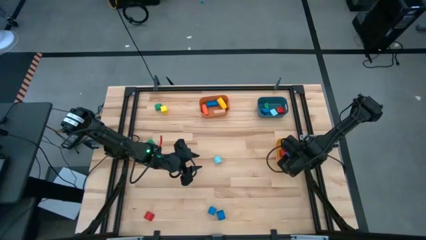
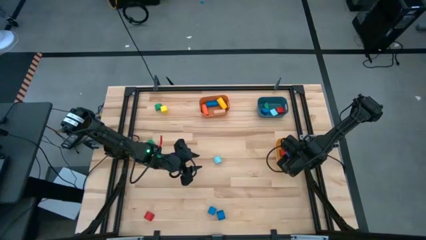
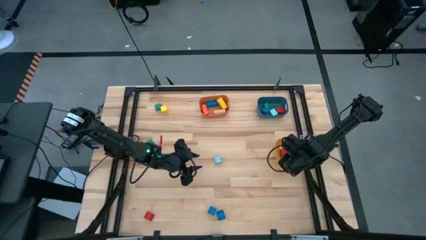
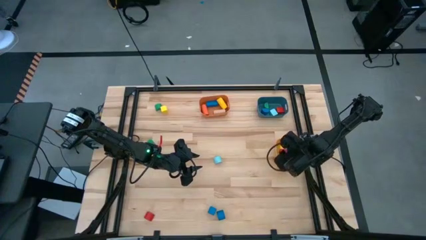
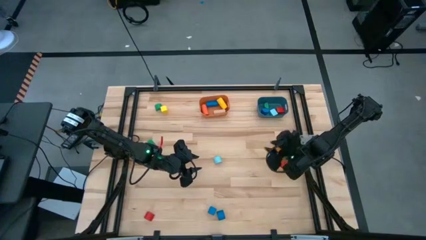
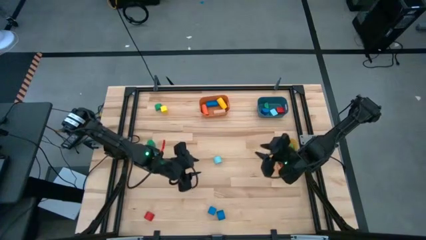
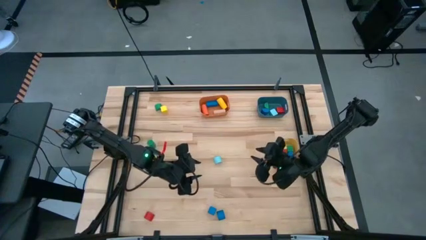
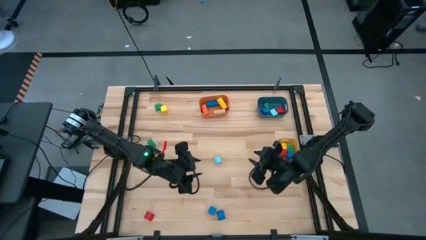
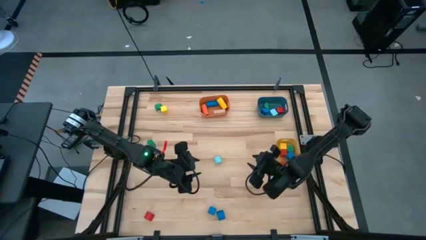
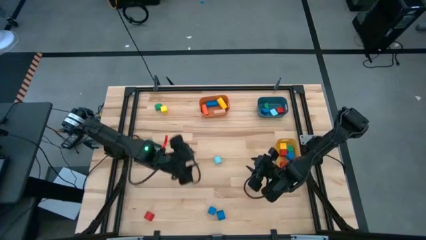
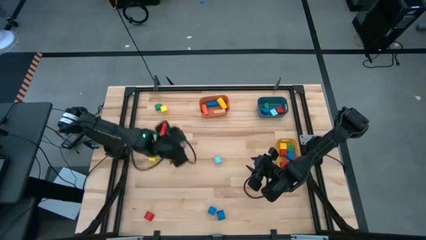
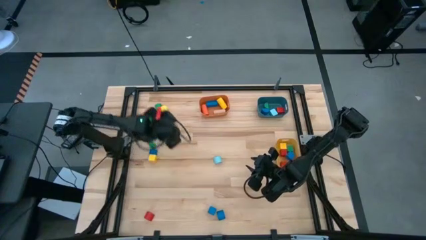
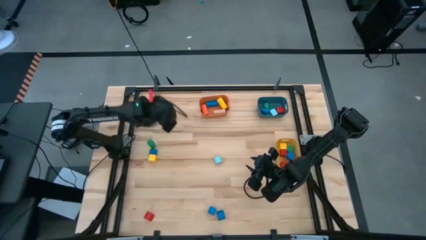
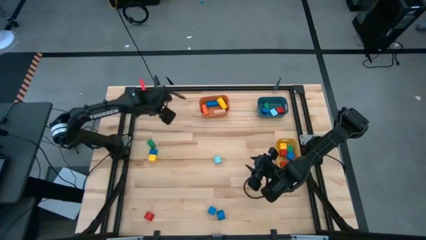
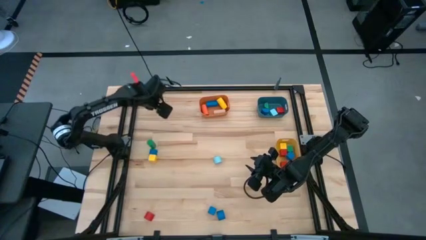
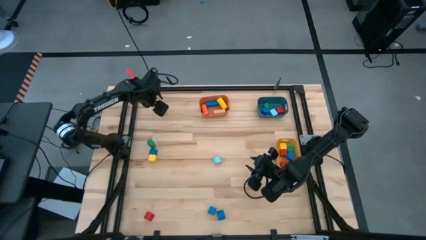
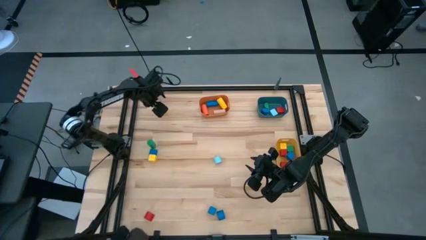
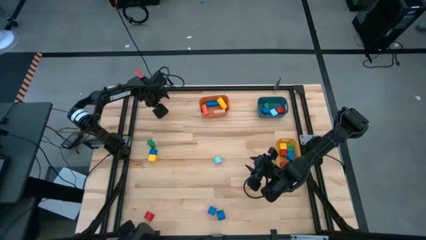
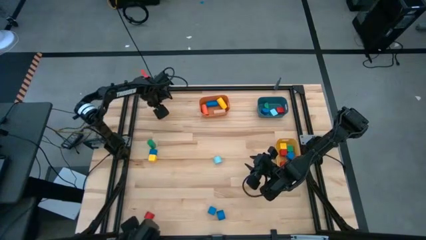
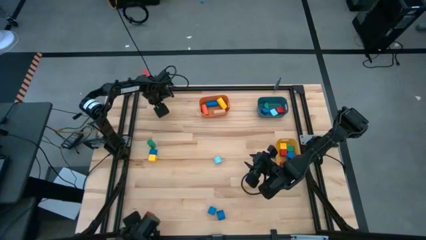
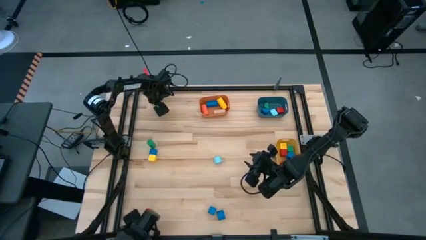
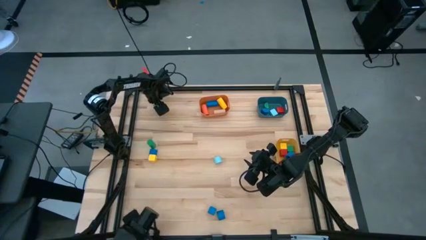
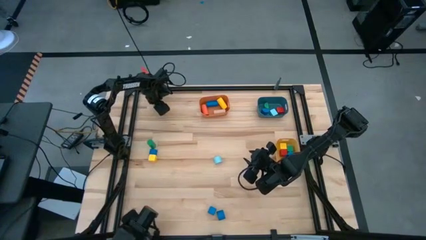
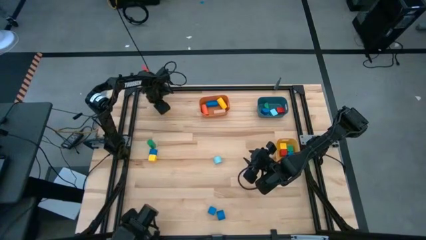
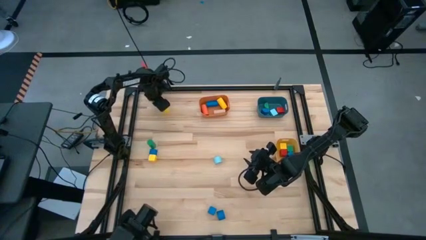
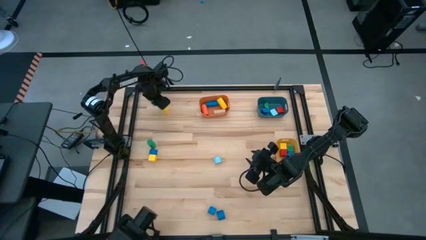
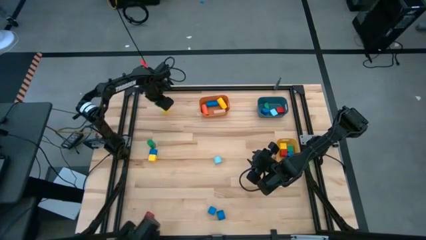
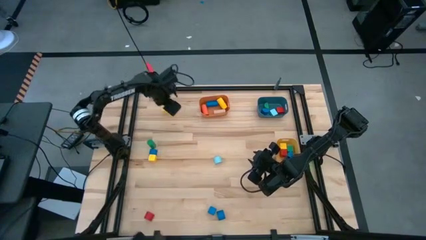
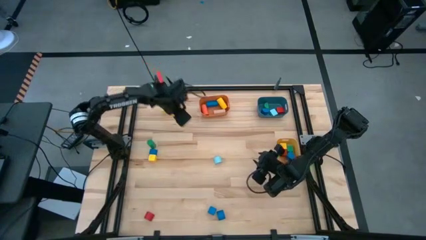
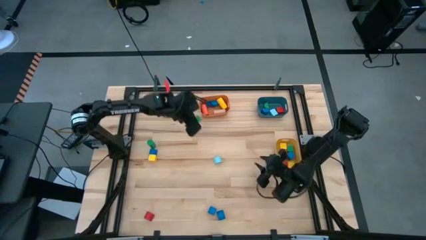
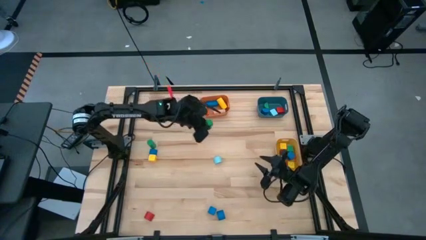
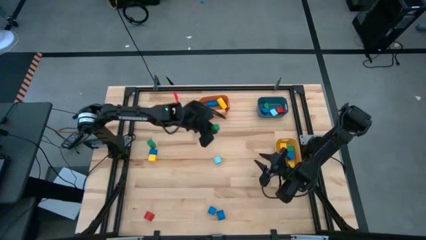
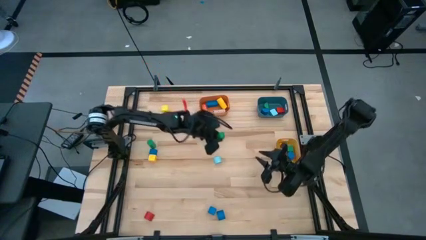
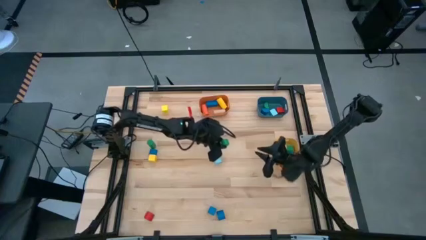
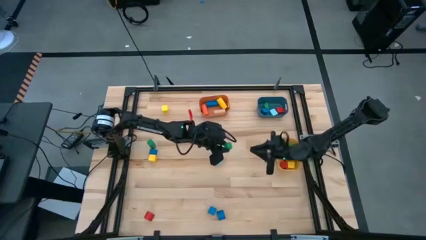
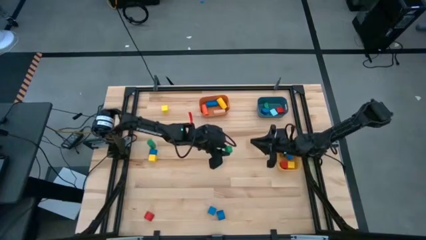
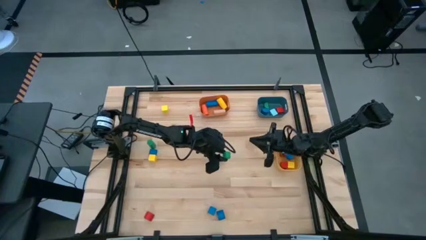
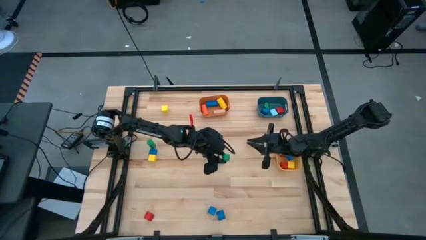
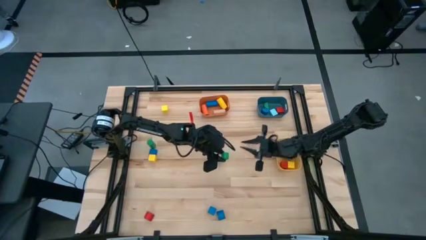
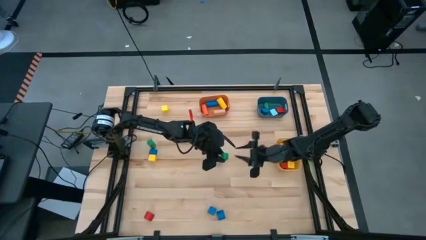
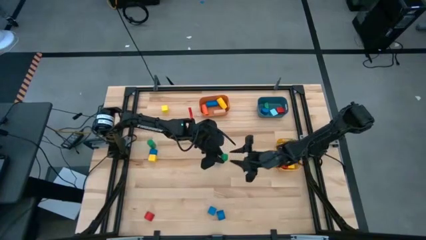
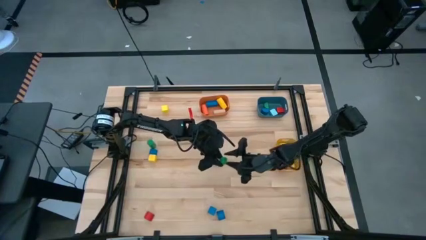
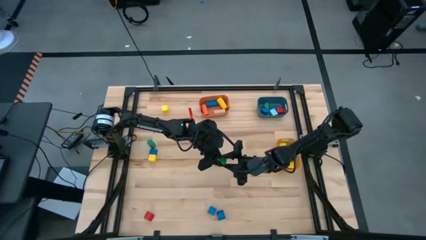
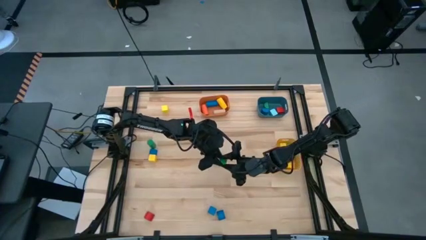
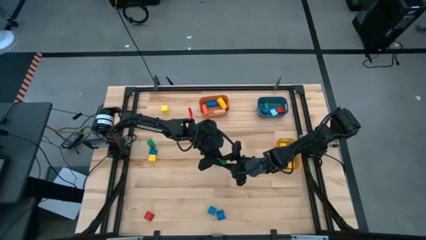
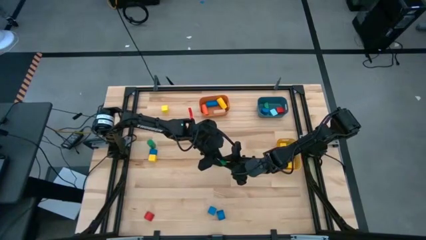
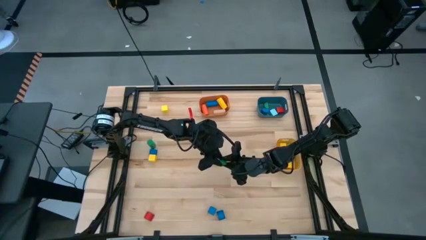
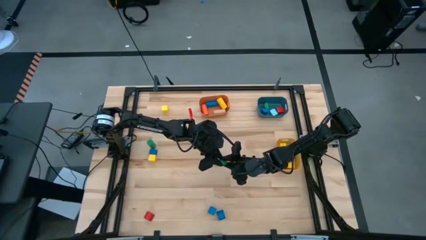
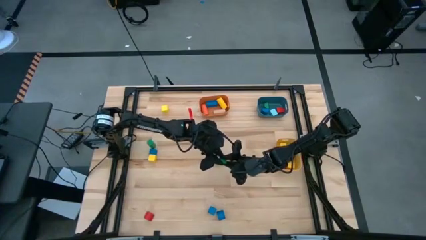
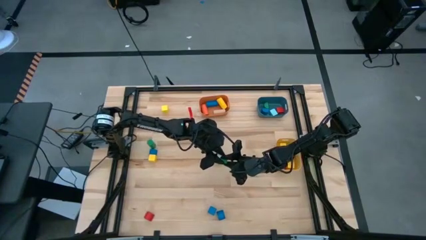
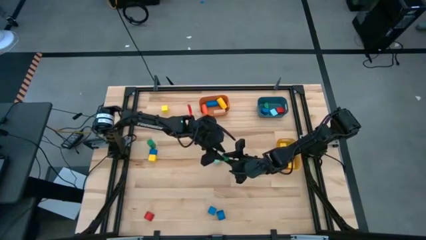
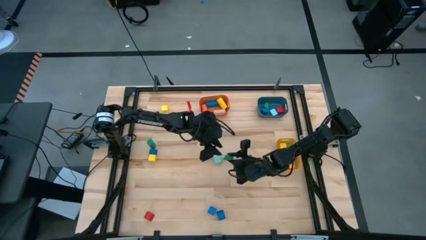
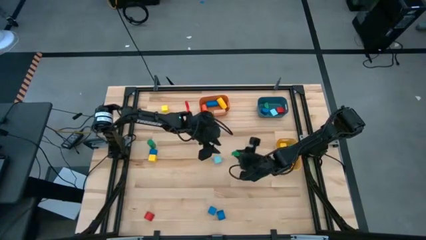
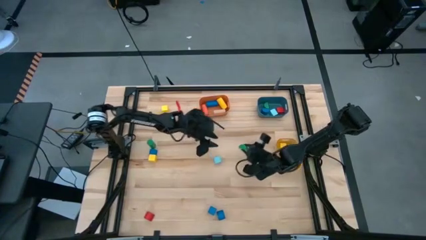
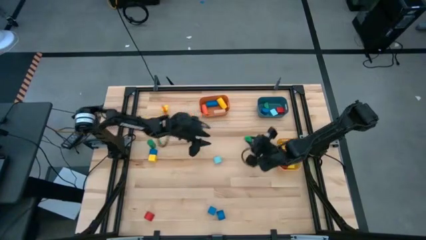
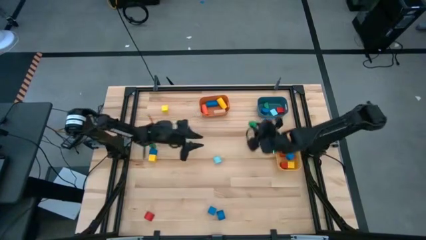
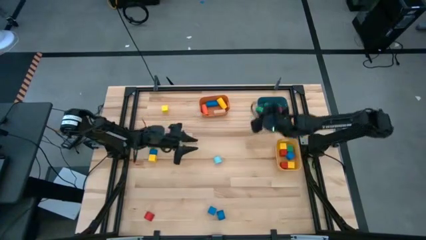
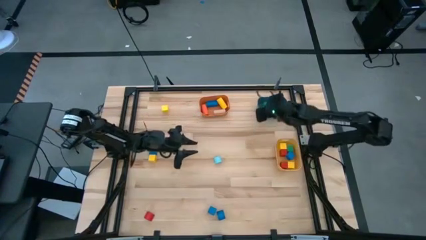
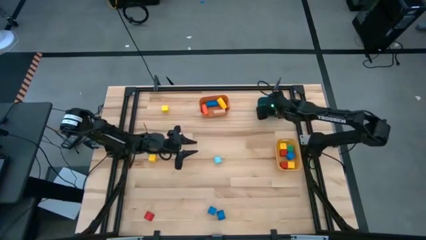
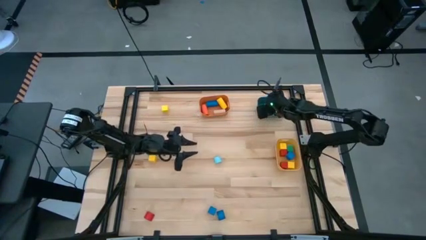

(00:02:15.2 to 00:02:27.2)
Task: Sort blocks by size
Put the green half circle block into the blue bin
